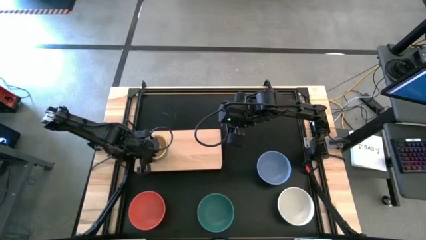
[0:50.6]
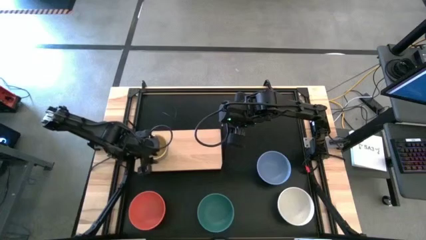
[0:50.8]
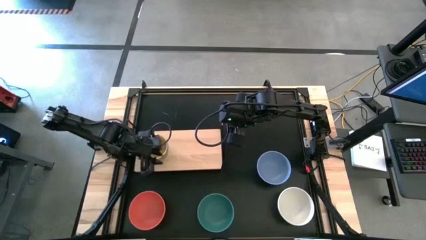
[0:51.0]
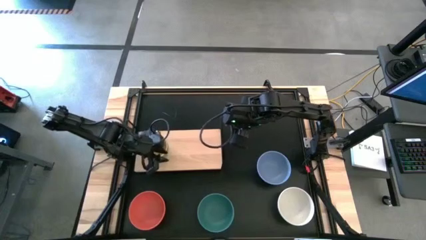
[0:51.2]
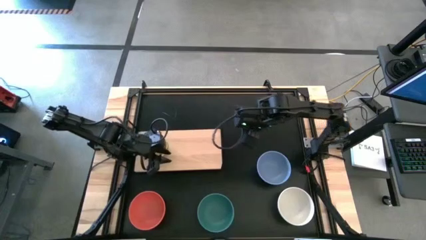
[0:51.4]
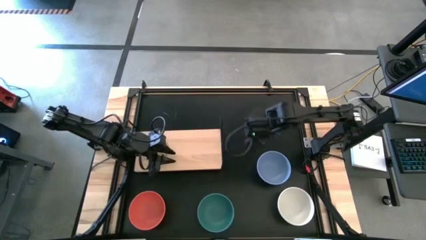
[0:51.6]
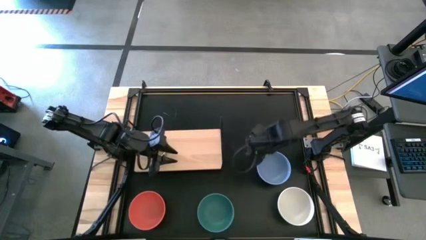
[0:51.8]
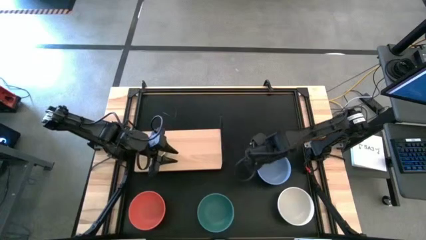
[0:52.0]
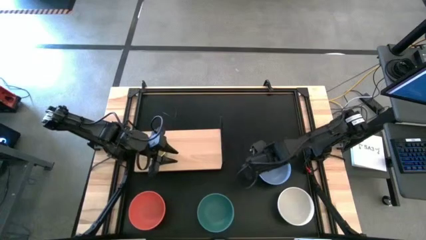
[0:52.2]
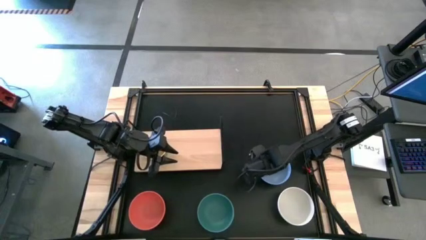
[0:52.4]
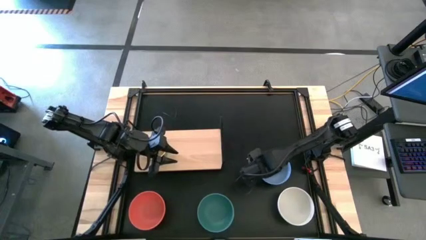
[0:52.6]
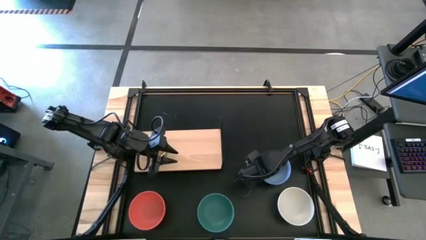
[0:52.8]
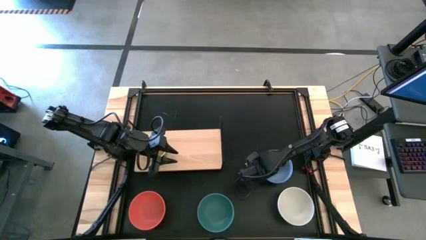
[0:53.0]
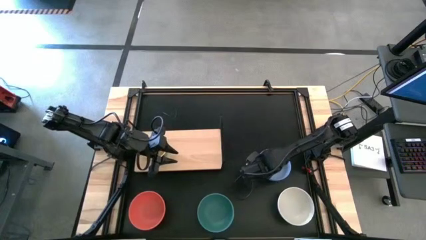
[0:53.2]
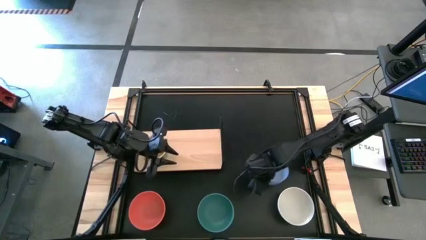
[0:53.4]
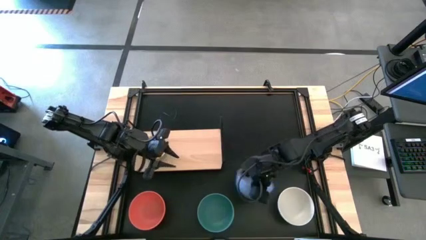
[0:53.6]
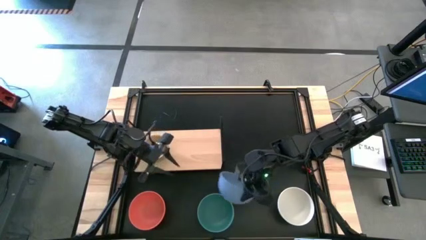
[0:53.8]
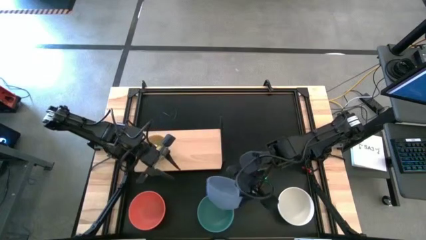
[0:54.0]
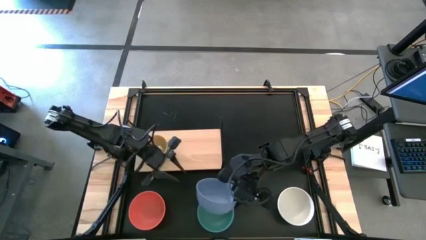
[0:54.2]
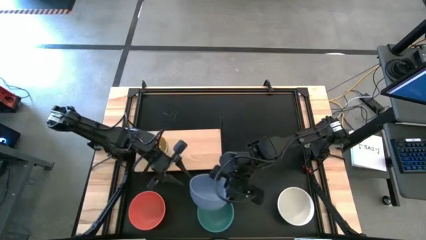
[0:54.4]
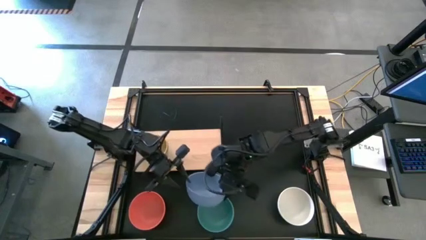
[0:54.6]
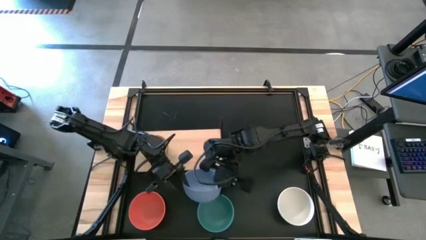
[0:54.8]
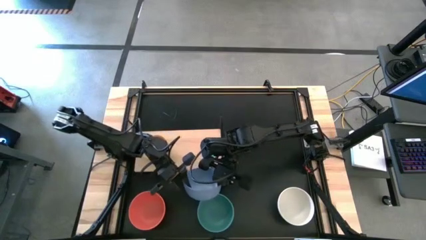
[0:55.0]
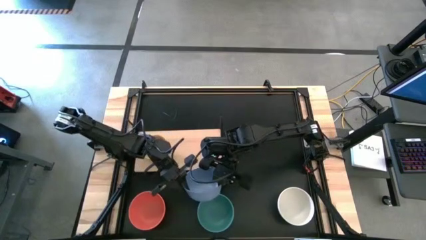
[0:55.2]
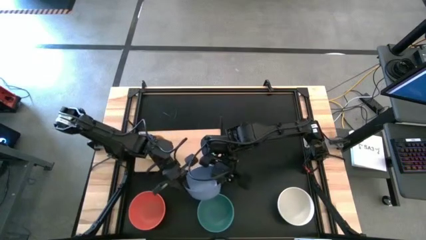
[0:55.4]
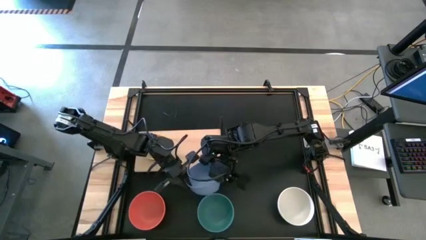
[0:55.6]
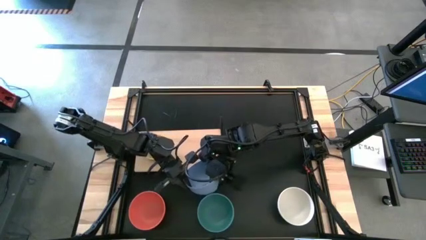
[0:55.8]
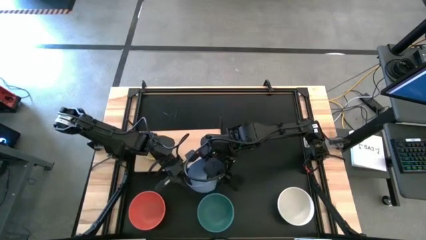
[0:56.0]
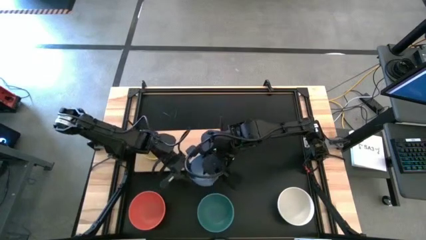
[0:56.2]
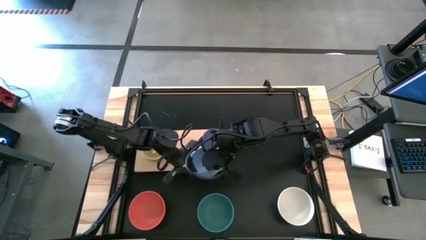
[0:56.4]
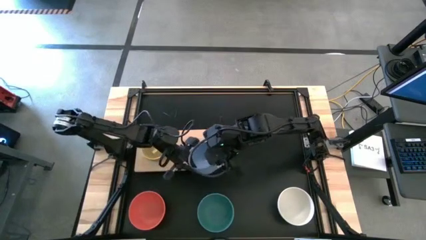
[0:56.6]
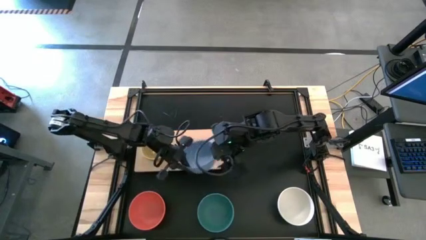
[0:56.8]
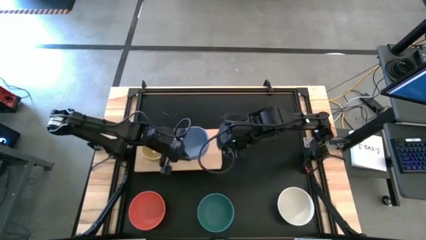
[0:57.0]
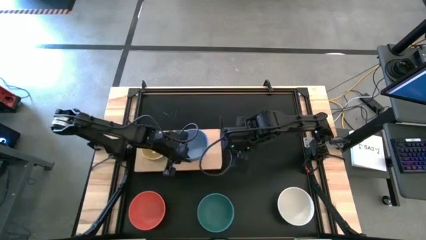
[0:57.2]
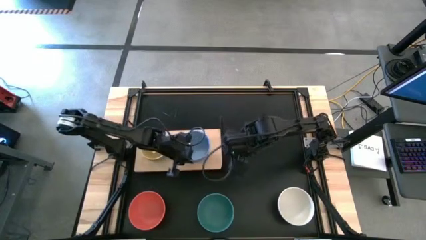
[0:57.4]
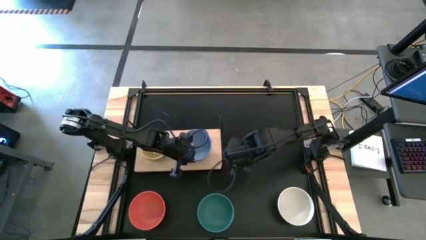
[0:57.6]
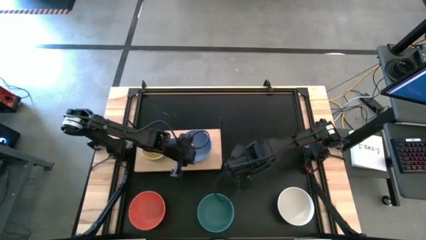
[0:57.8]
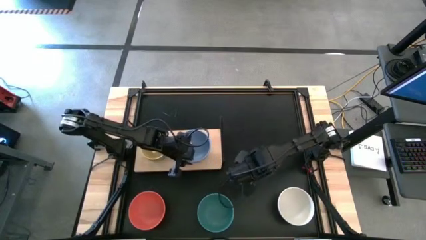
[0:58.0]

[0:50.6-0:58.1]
Task: Place and stack bowls onto a shelf
Put the large light blue bowl on the shelf

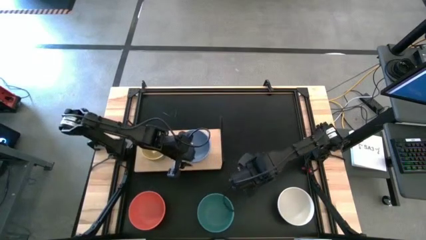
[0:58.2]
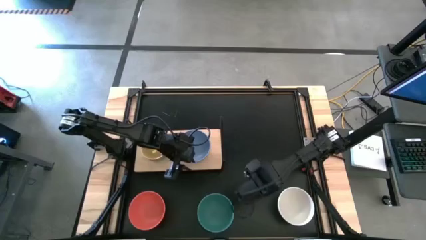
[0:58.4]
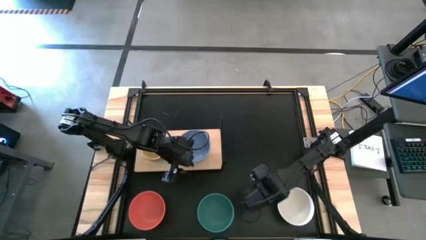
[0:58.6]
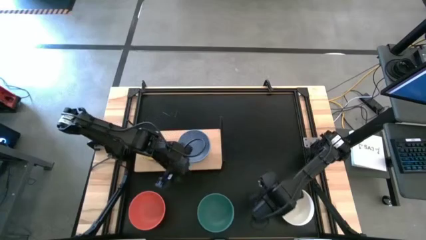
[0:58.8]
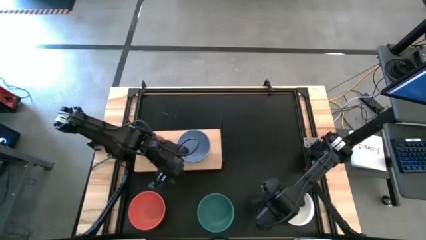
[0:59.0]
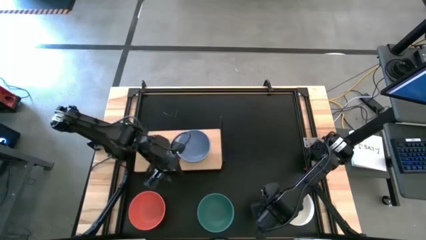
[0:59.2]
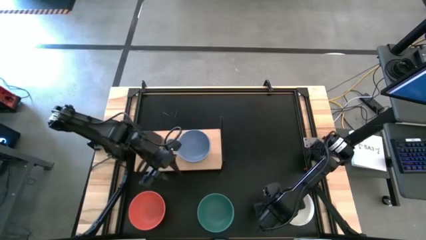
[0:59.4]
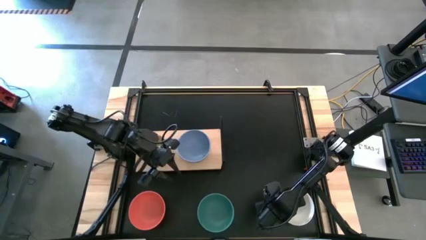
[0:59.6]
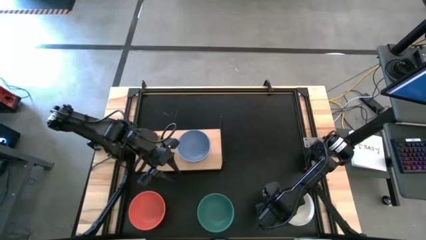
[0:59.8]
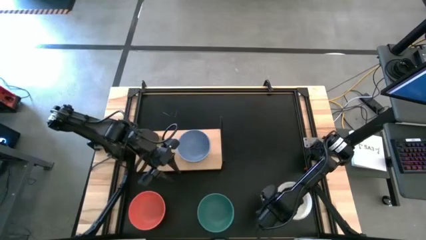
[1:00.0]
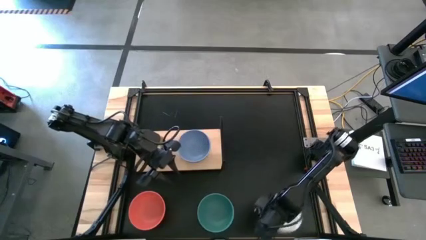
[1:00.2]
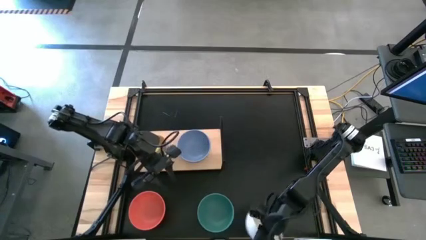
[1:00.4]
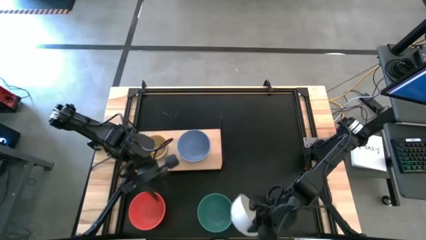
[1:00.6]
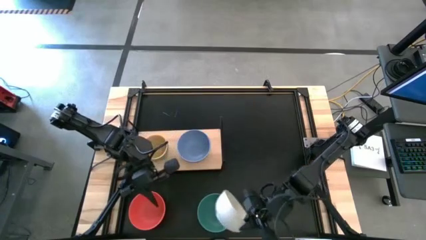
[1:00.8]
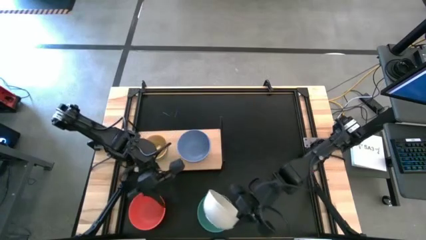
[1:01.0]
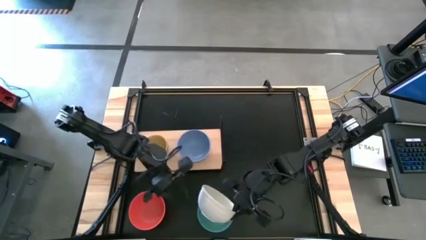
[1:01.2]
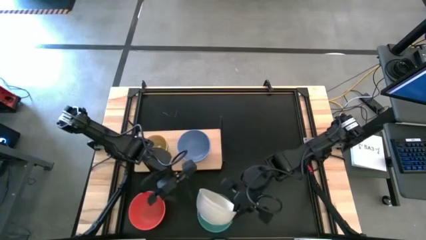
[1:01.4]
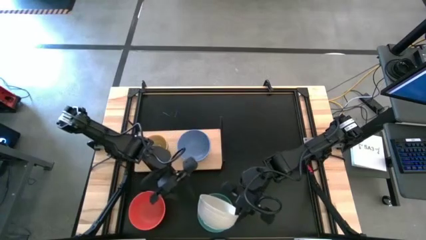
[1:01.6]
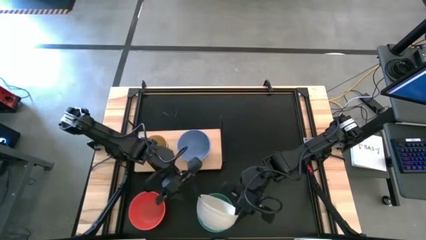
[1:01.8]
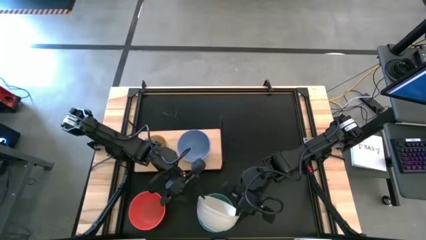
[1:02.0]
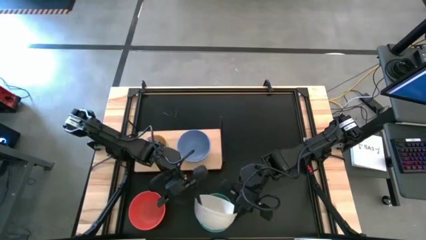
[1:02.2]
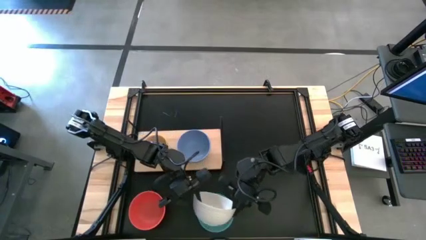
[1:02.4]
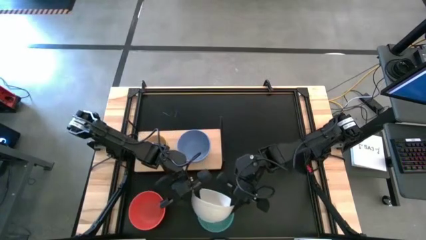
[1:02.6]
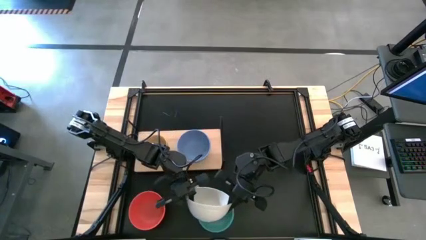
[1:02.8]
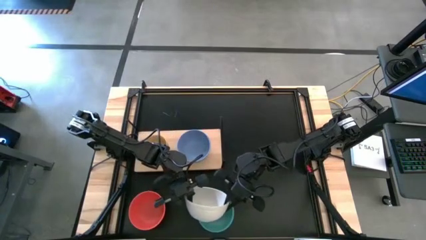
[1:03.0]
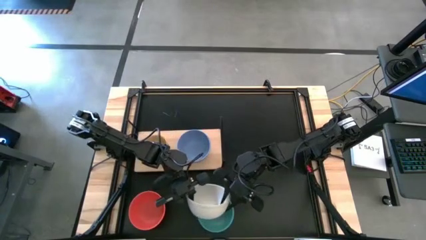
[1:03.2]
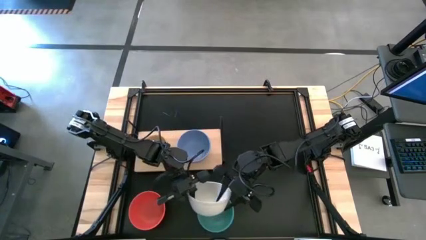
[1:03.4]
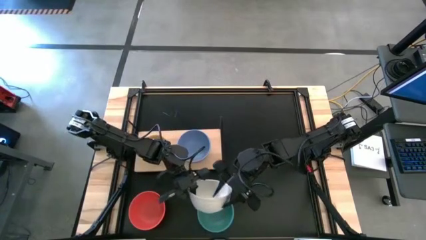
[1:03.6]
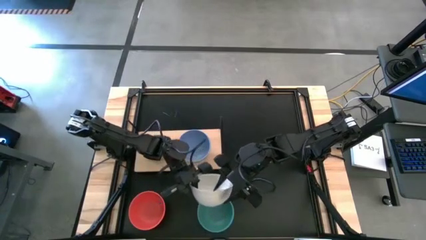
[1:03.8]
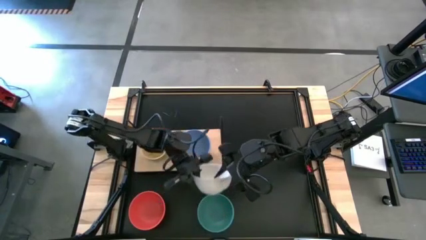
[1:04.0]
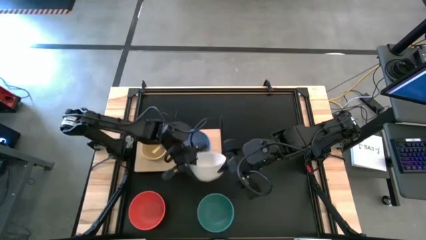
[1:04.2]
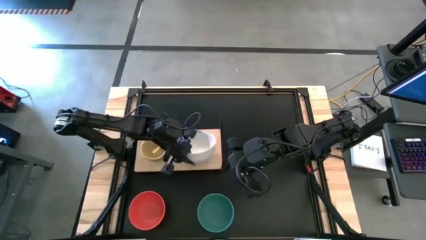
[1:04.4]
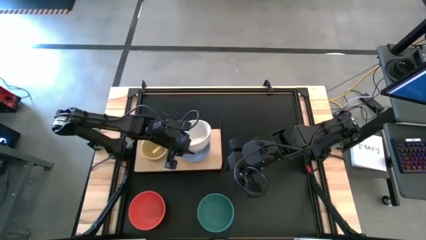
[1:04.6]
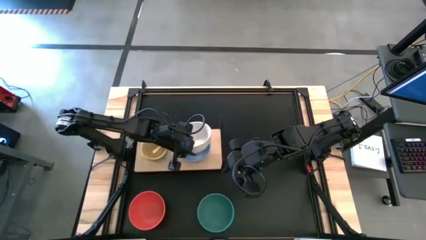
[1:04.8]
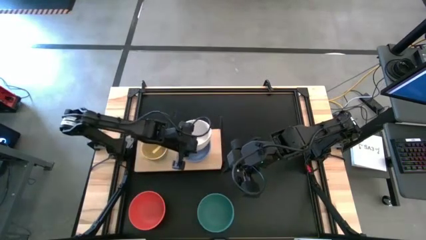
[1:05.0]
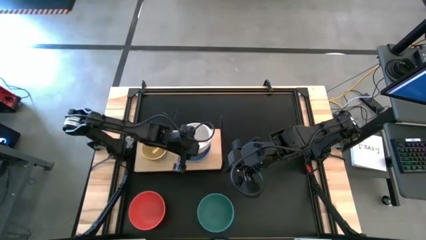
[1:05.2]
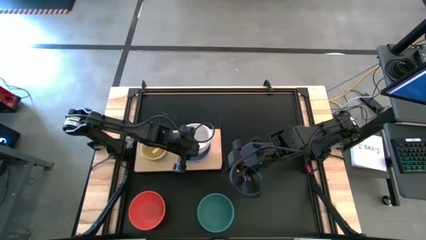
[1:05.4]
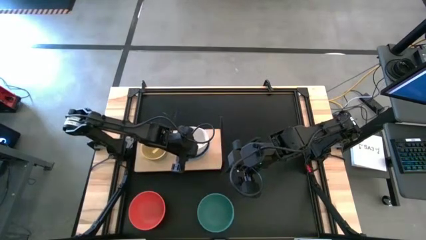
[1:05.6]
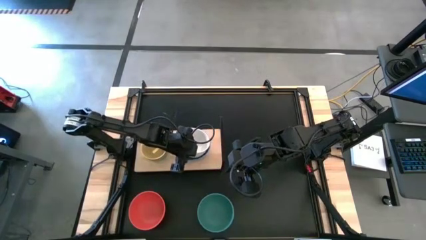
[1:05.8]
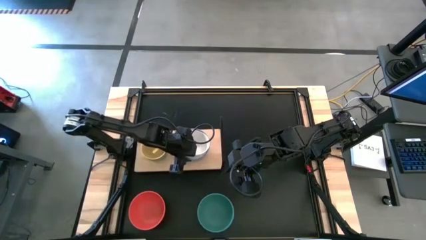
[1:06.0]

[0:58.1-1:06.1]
Stack the large white bowl on top of the large light blue bowl on the shelf
